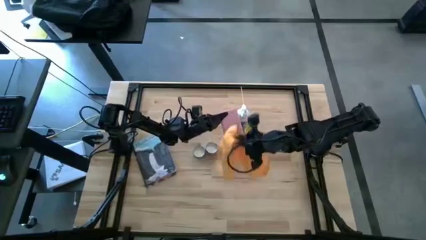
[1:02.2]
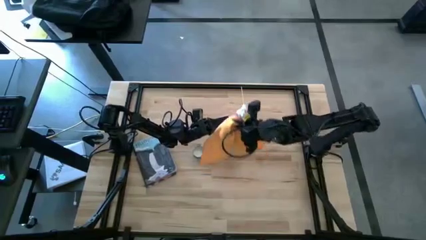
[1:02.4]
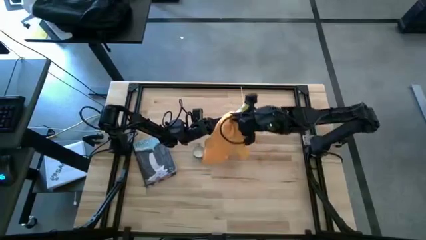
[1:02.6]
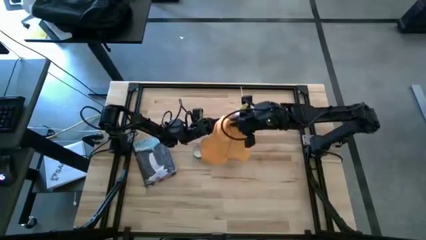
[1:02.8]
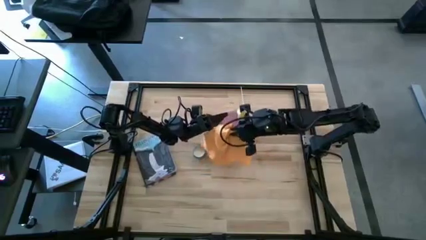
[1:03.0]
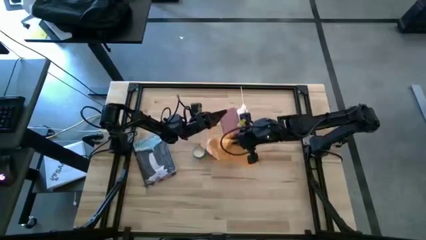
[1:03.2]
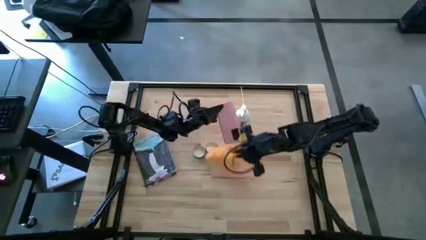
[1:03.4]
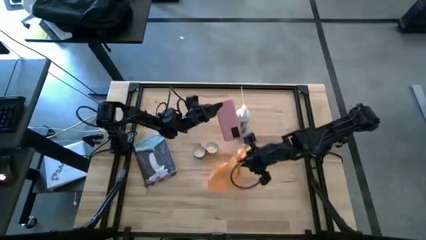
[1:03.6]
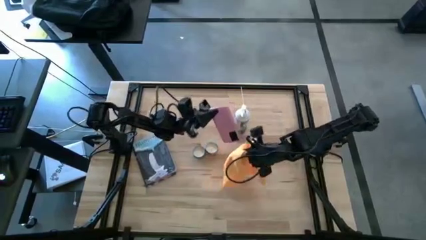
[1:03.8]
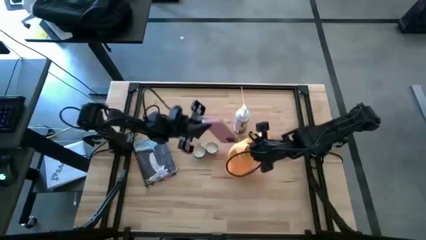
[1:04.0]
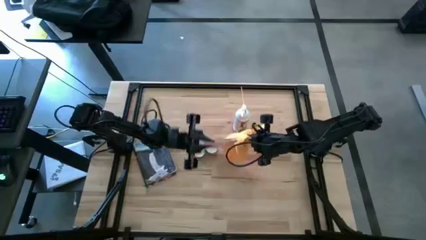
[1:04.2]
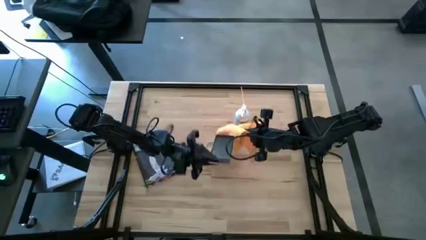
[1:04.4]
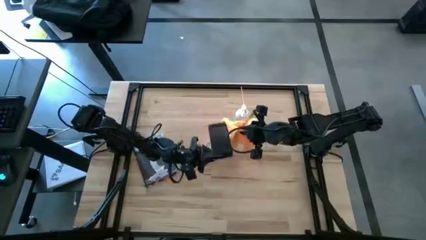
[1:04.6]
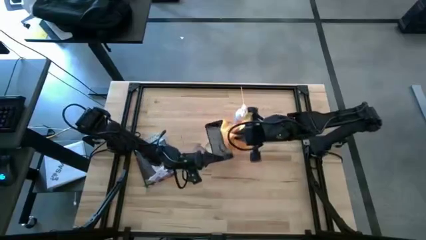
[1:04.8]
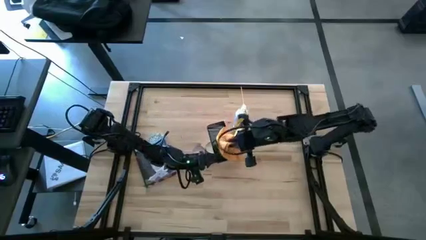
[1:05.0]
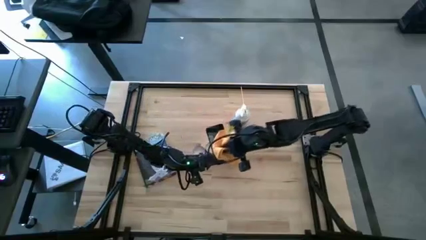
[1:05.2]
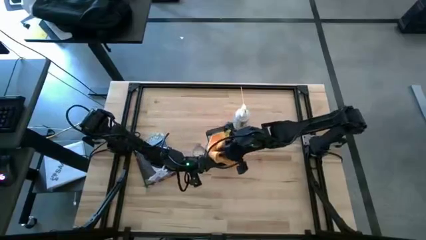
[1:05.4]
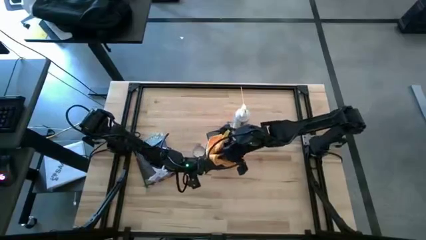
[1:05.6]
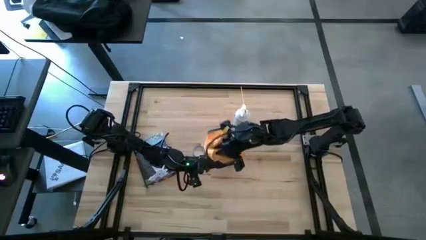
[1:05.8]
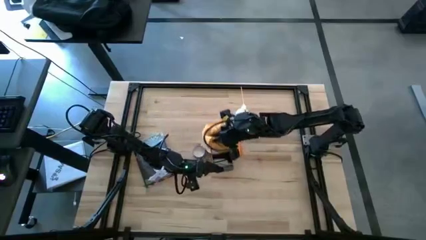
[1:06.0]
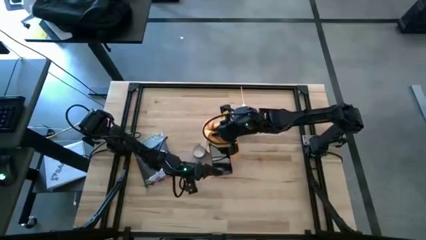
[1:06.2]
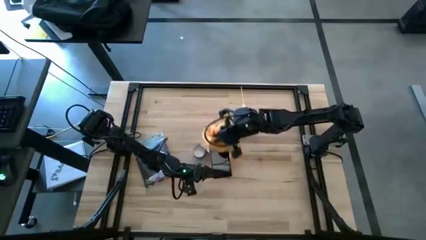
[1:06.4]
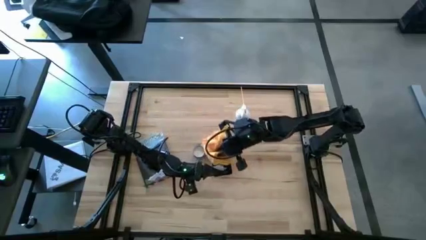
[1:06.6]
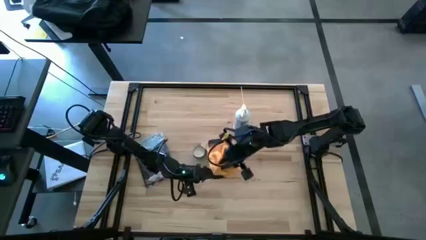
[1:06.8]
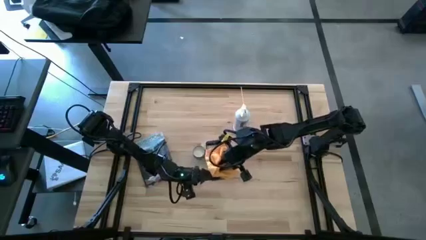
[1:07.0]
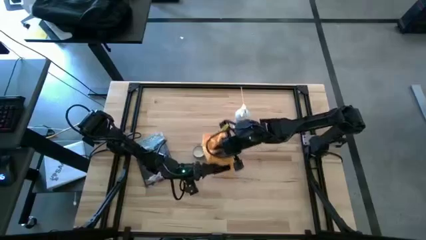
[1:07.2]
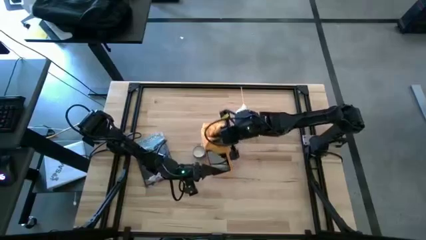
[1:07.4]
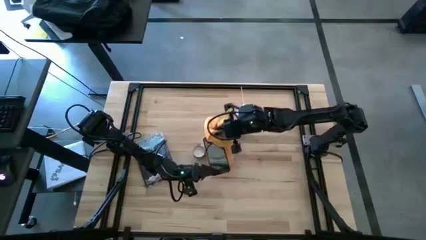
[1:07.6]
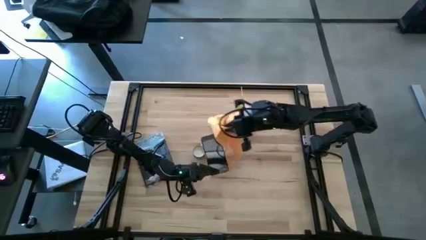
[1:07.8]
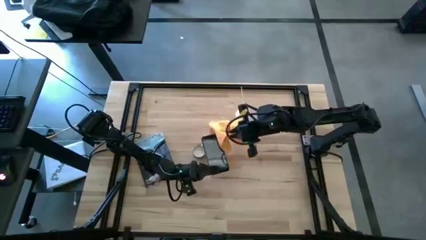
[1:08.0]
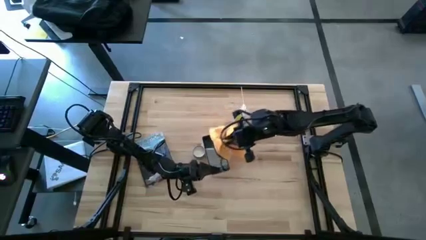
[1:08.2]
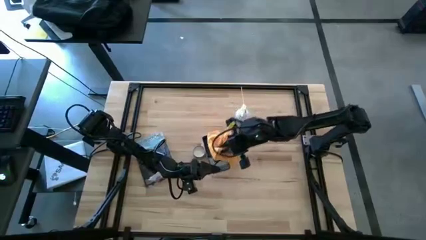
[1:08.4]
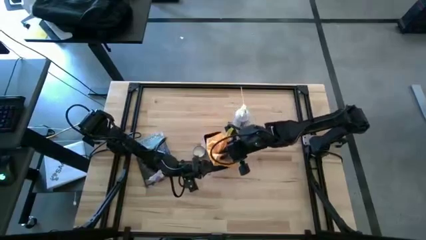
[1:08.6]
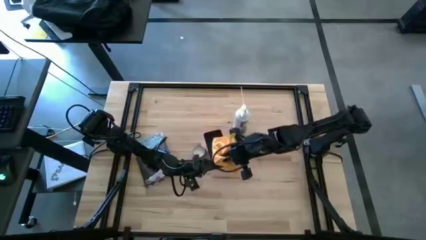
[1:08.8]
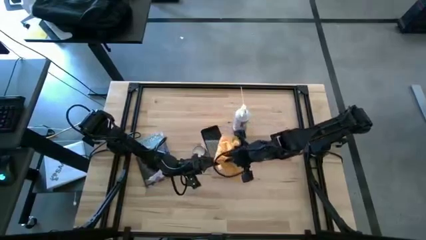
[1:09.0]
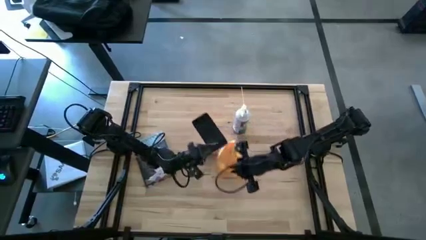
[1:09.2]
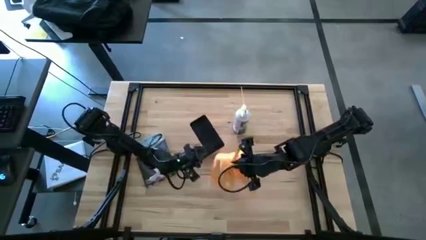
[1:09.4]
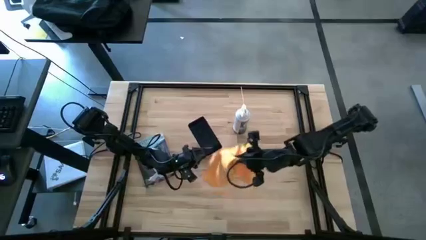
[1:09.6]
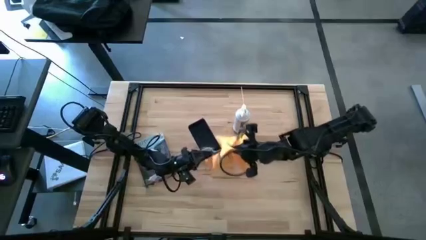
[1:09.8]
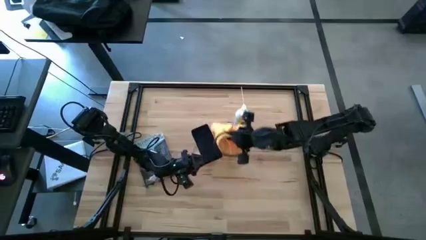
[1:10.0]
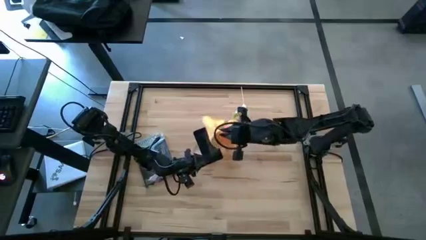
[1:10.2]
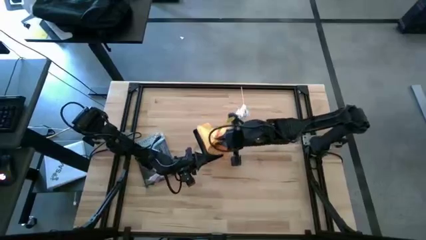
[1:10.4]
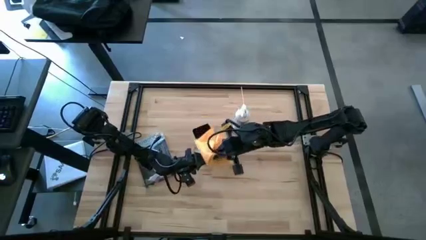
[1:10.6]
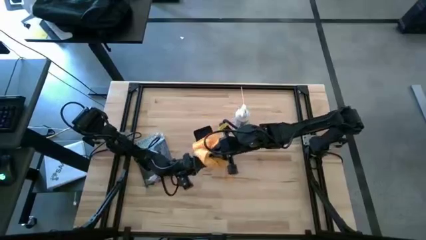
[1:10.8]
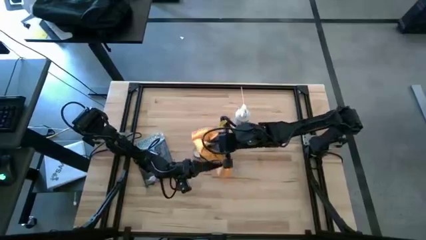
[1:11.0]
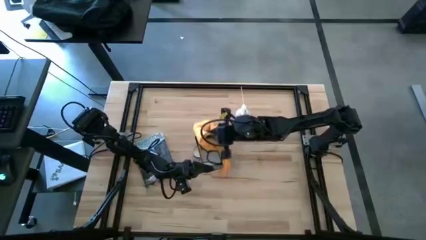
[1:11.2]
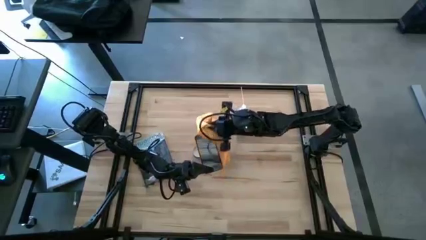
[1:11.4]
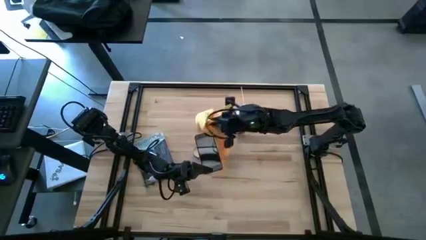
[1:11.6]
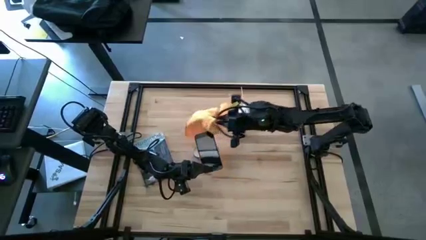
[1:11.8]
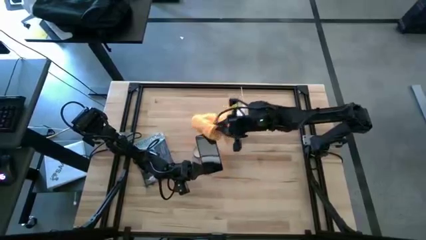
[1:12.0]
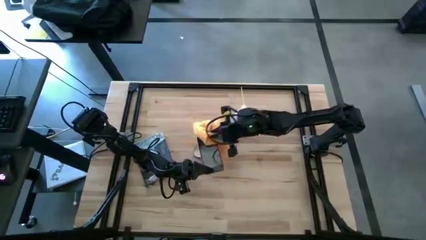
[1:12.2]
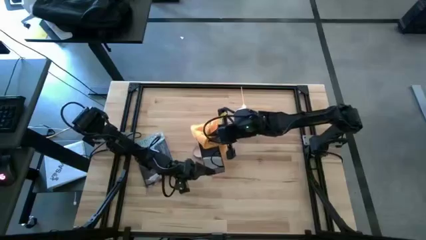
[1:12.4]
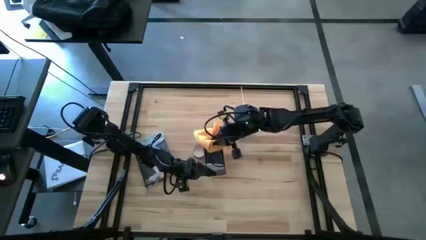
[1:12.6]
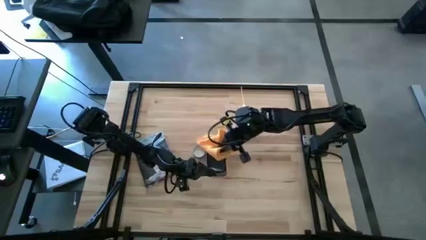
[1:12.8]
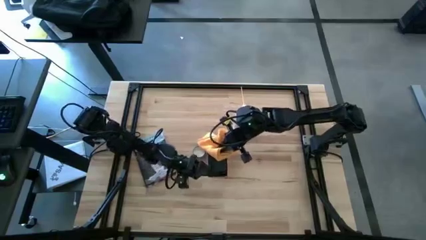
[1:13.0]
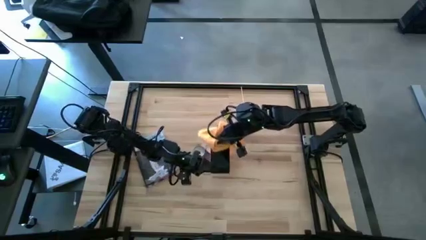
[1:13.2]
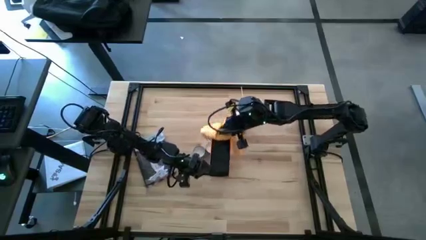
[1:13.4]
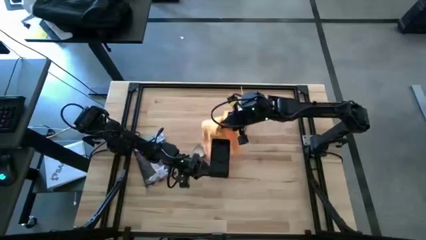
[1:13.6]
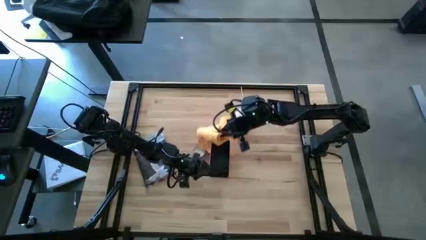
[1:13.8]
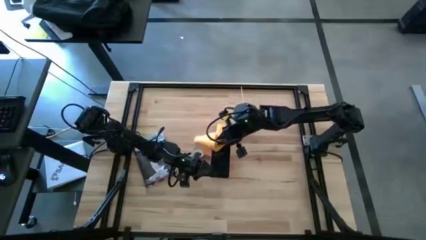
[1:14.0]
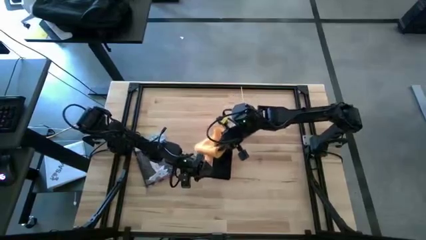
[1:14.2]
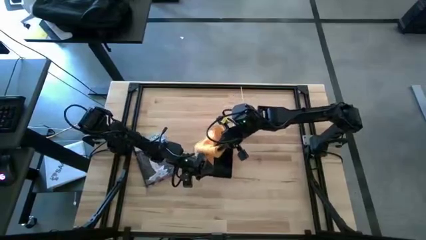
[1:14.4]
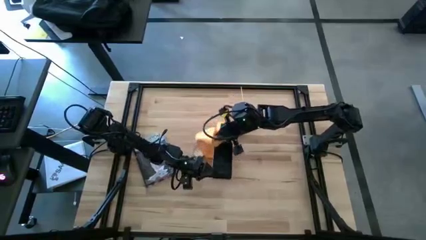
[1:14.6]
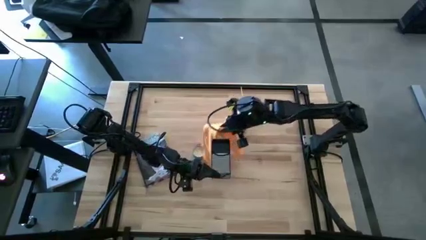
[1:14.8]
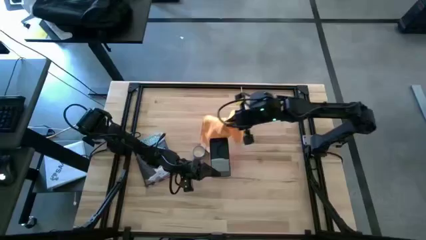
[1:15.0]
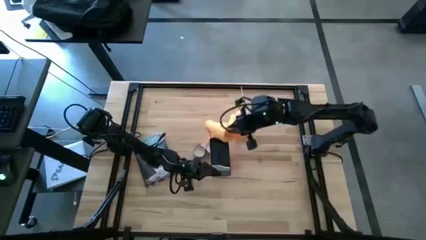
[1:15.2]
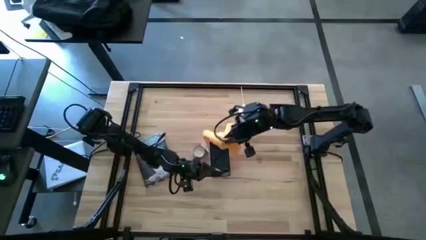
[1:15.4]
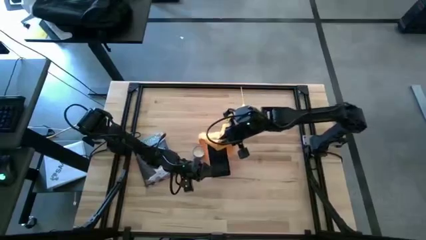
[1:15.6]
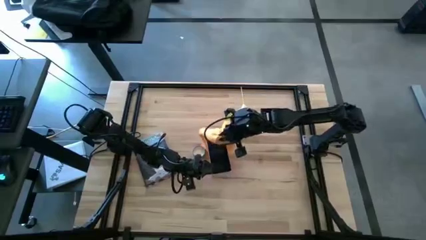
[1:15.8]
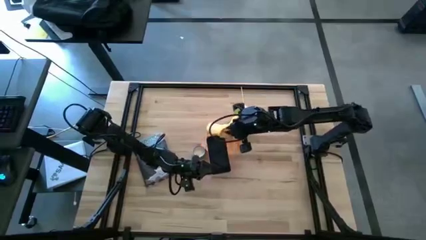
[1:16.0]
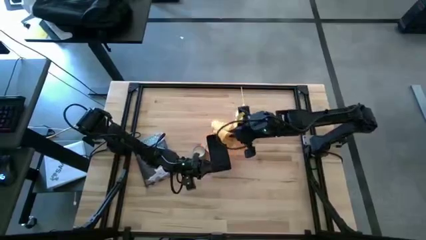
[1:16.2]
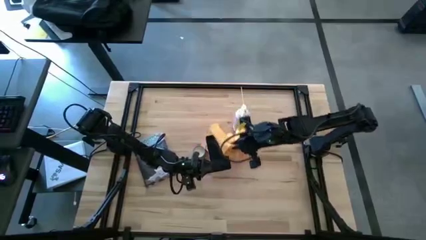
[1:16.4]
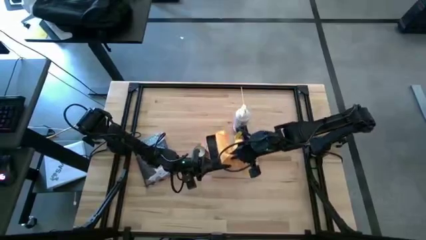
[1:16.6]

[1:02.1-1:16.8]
Task: Apply microfiber cloth
Wipe the cellphone with the microfiber cloth
